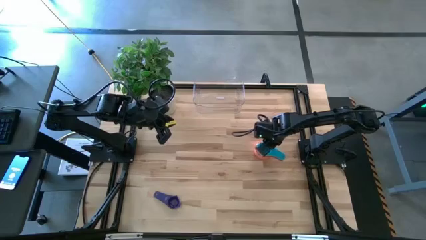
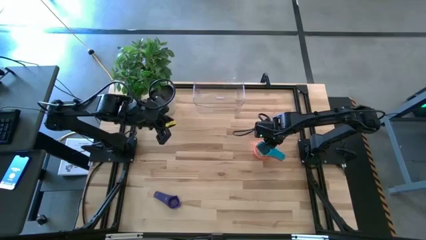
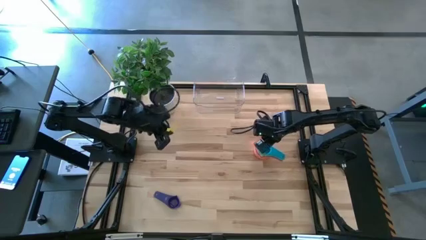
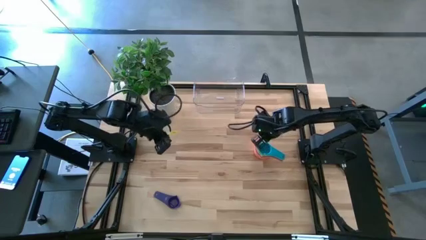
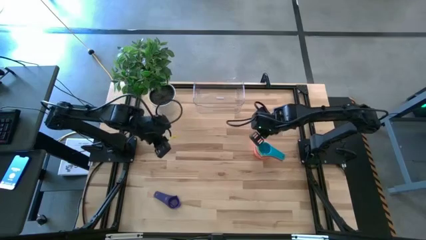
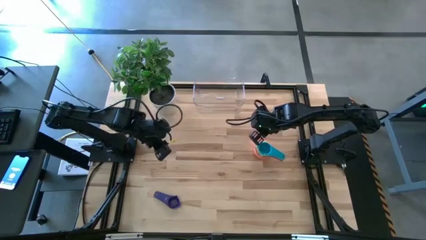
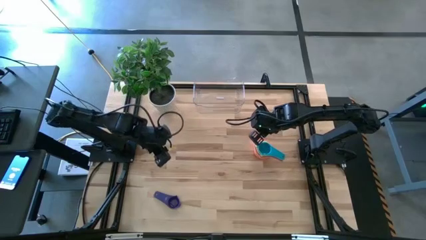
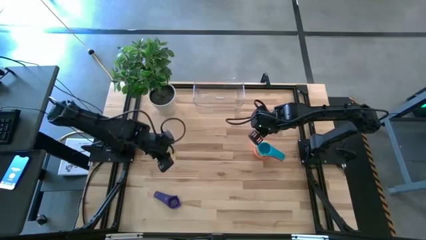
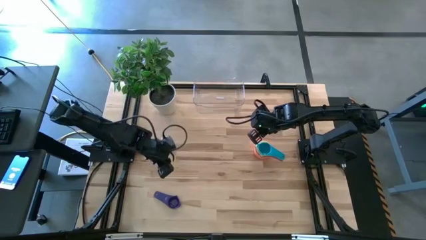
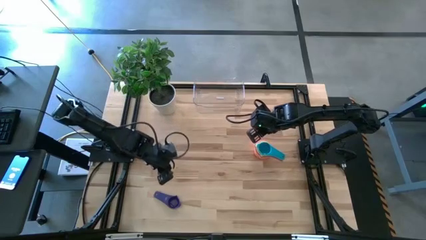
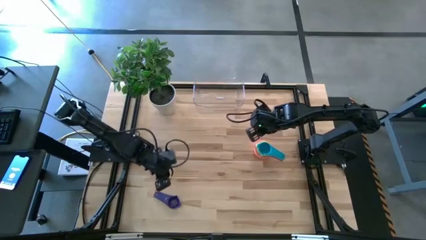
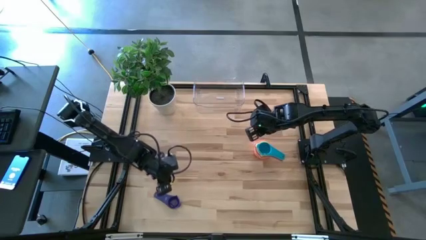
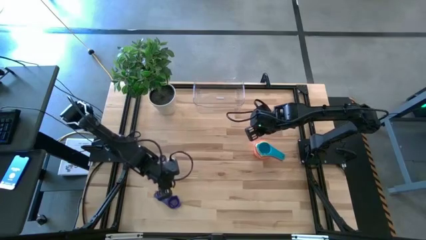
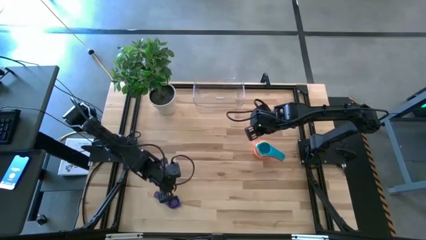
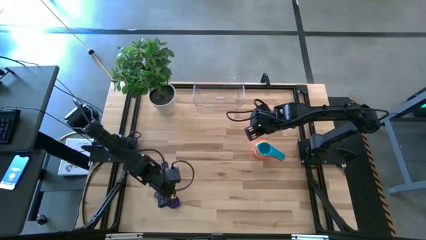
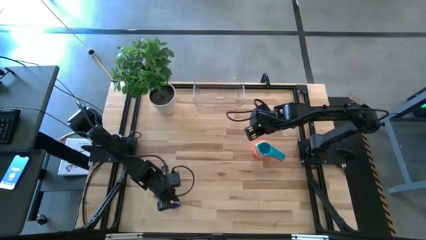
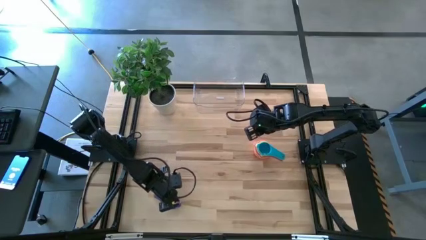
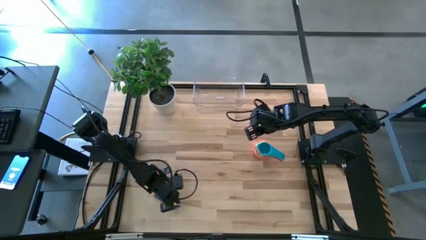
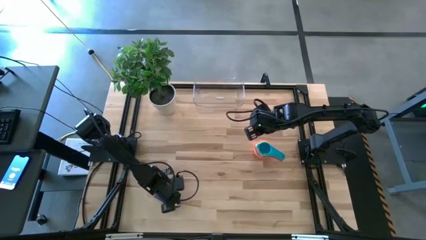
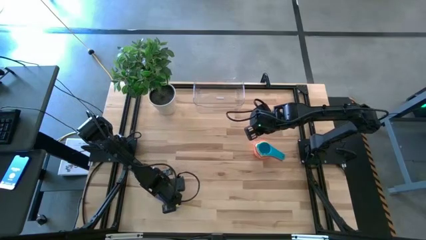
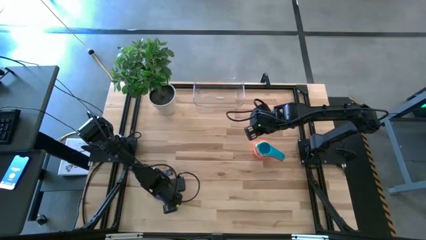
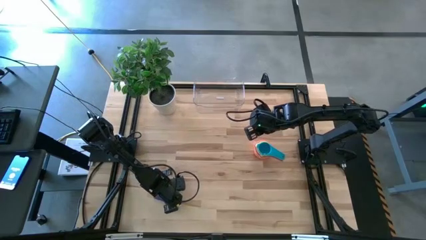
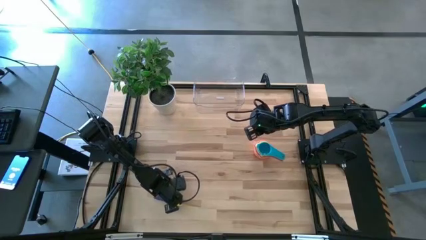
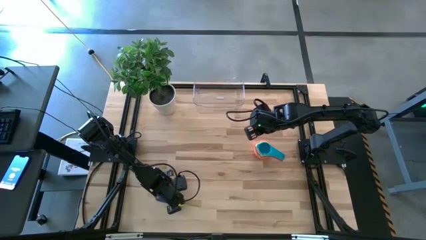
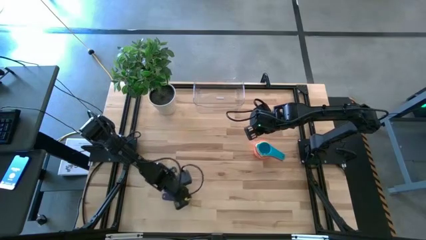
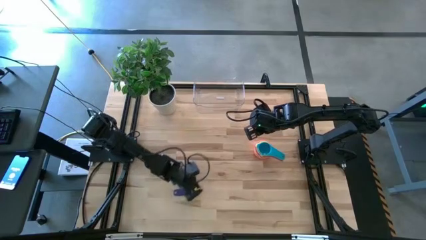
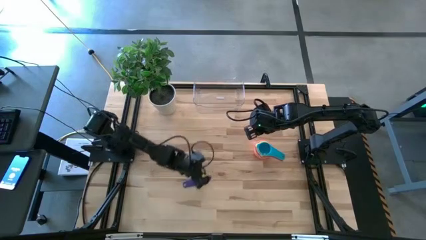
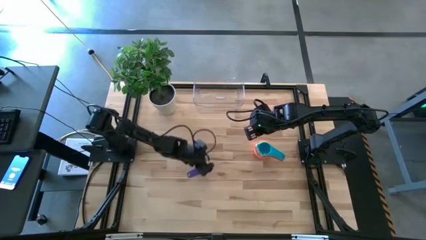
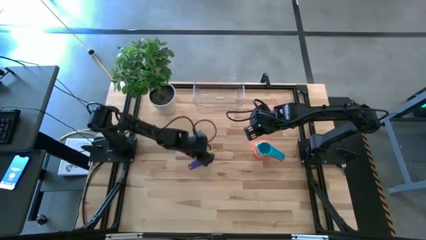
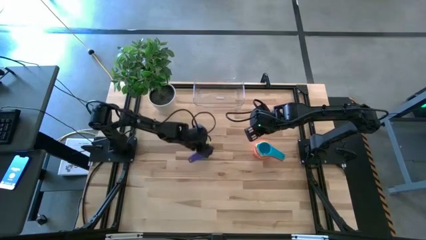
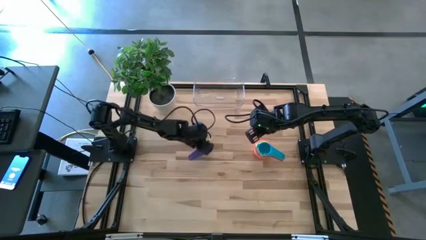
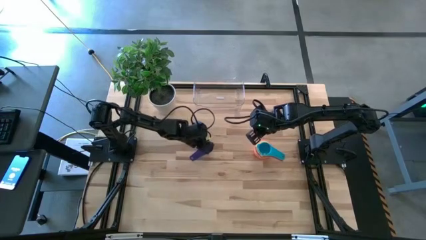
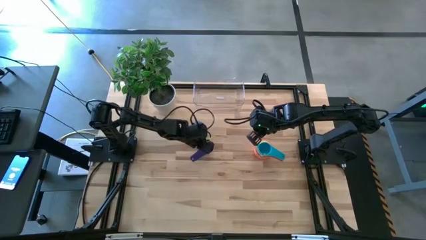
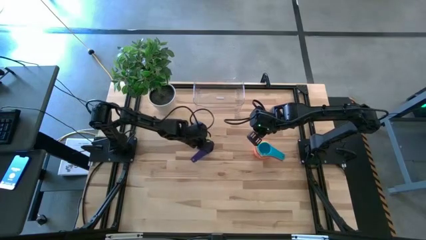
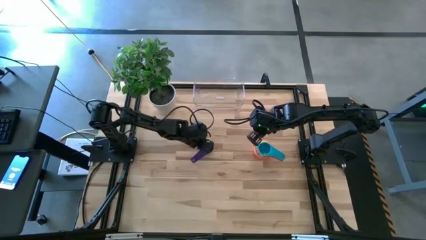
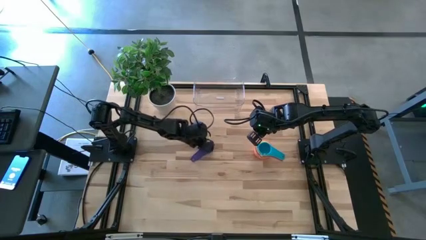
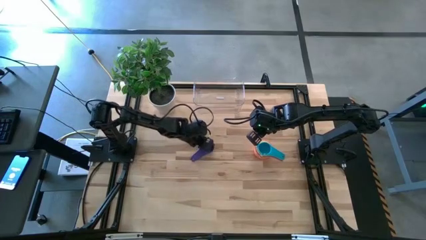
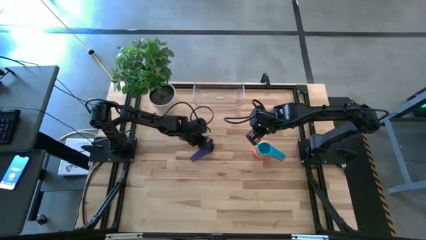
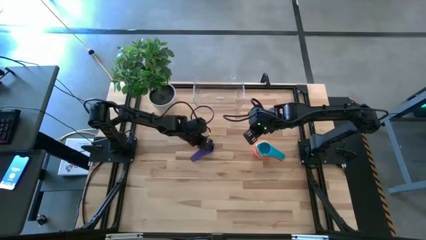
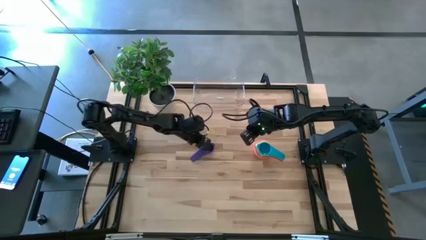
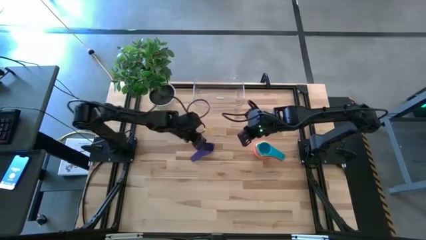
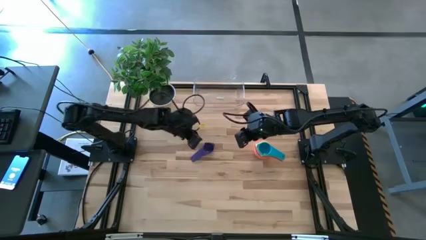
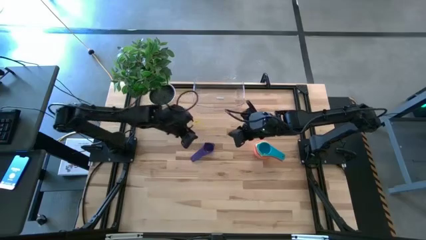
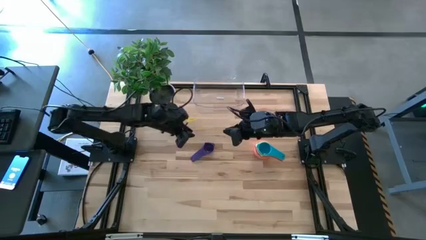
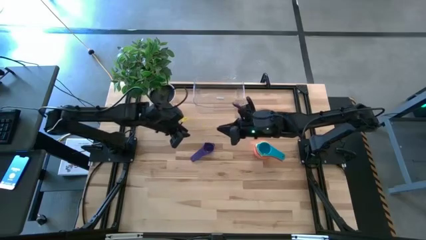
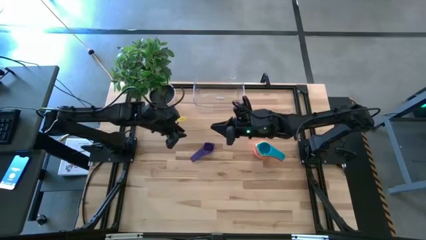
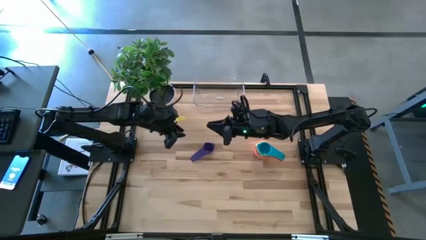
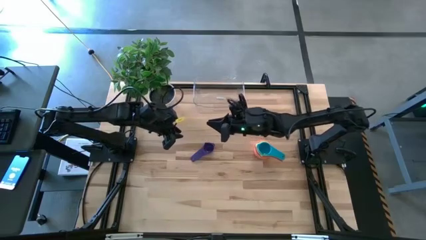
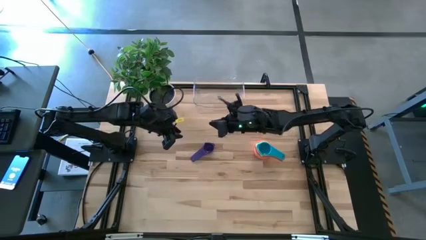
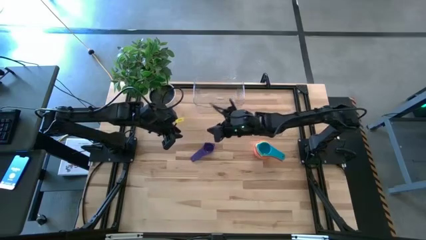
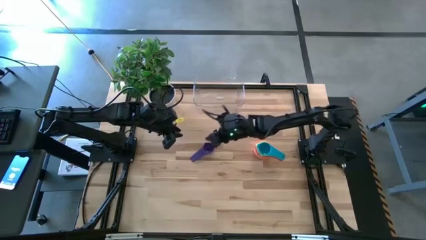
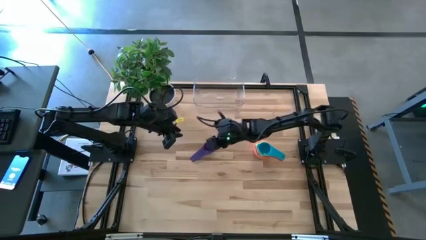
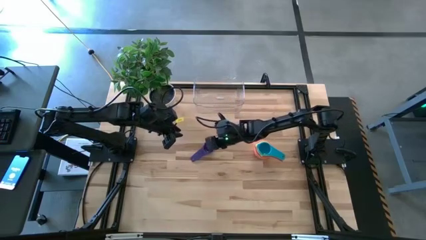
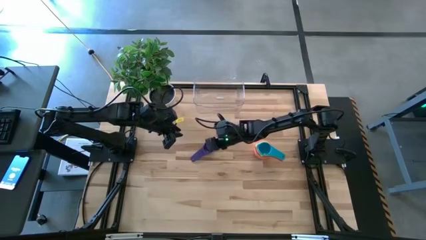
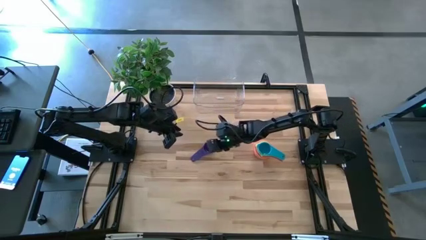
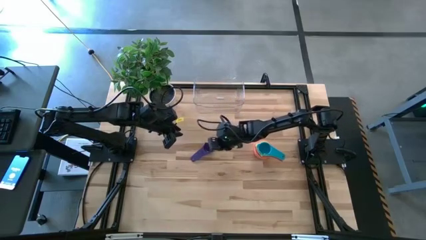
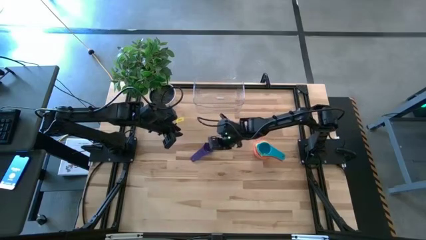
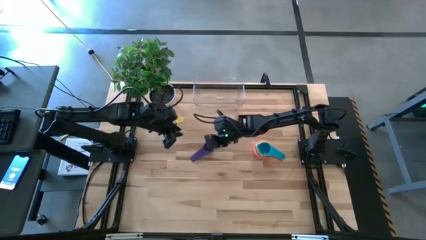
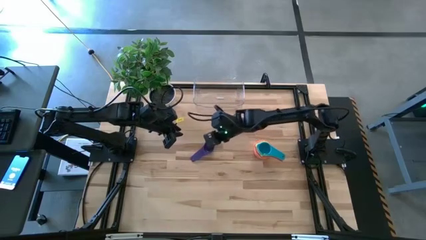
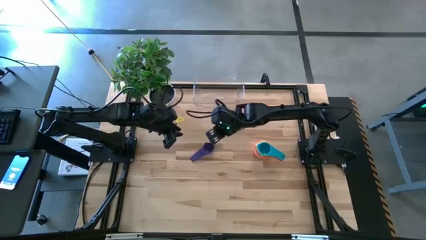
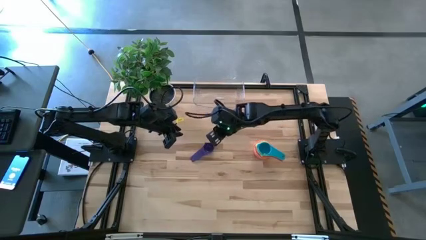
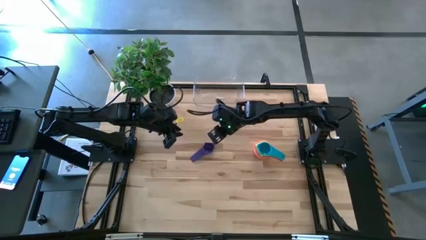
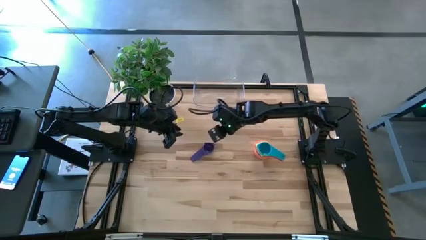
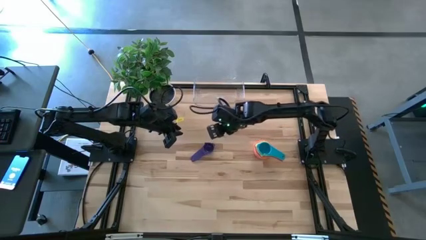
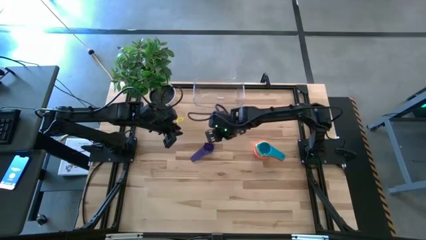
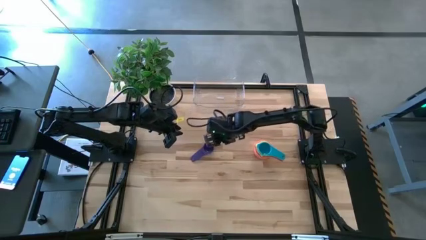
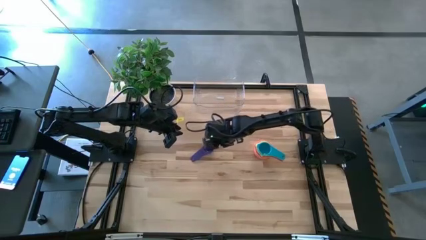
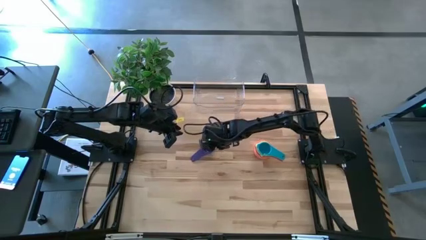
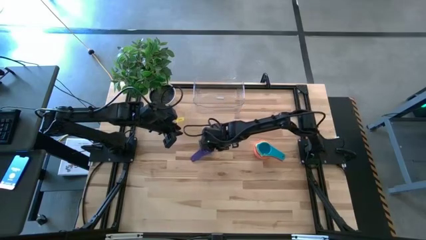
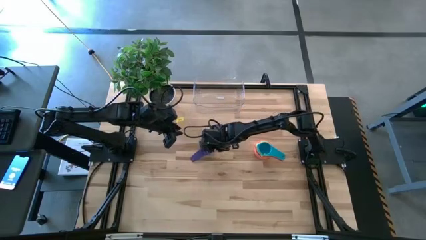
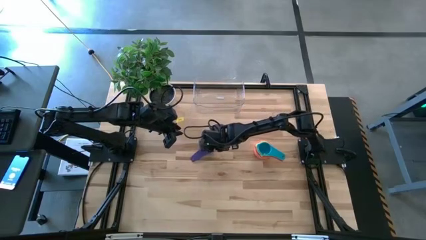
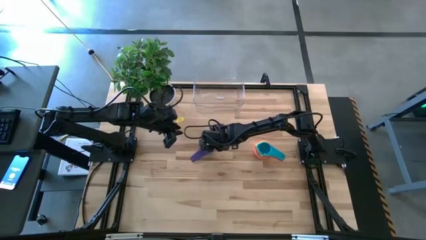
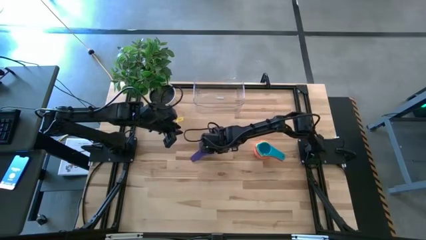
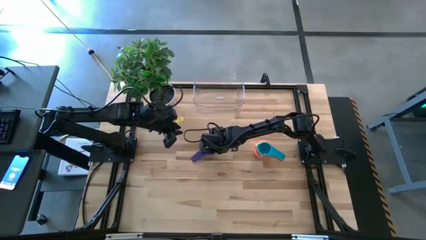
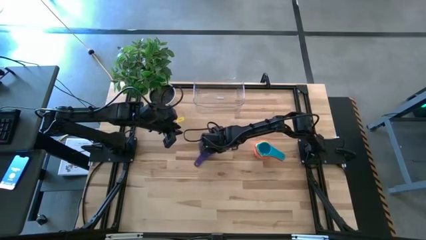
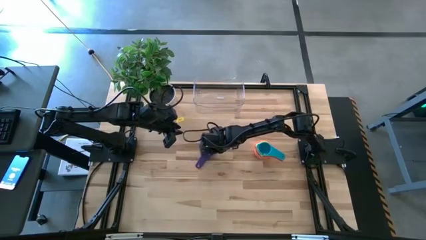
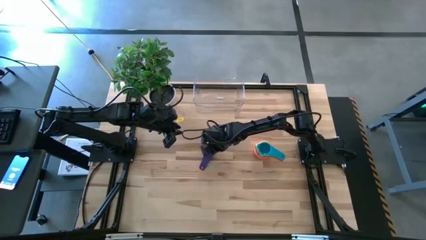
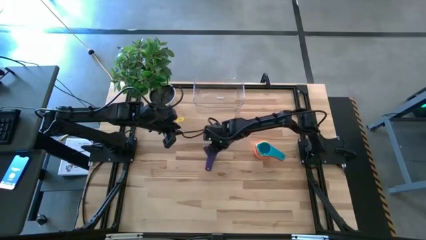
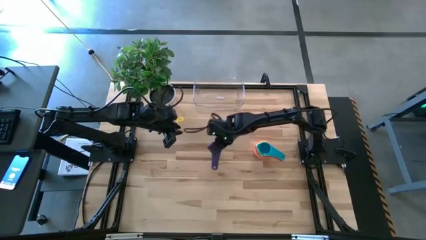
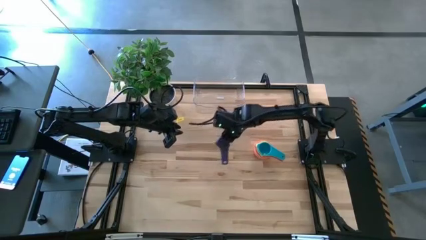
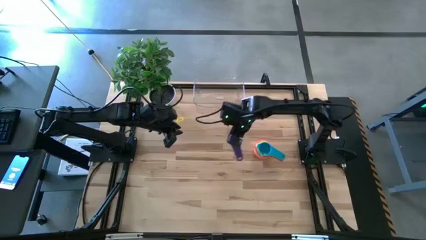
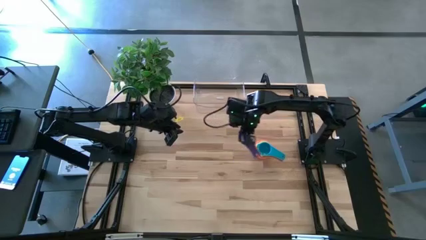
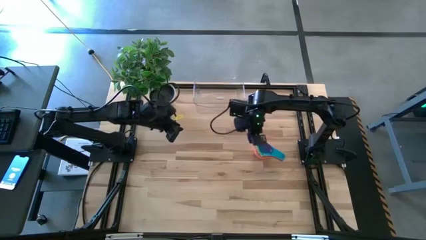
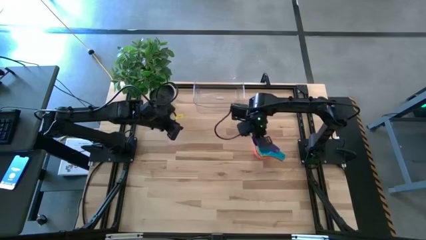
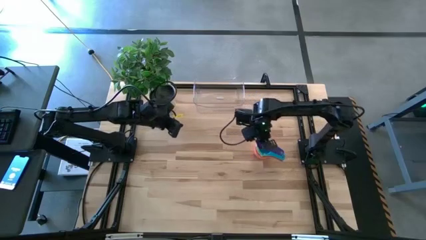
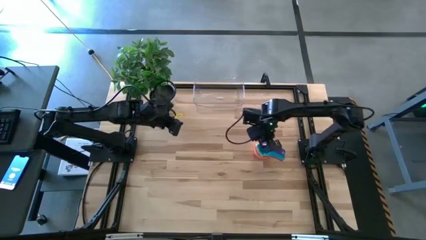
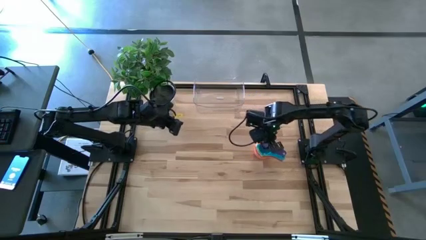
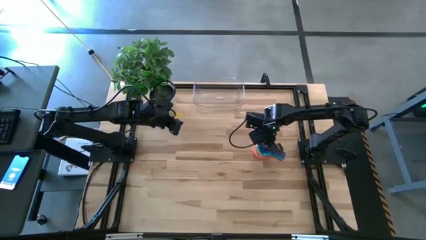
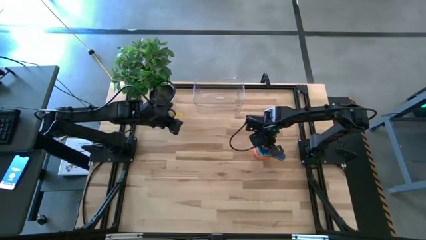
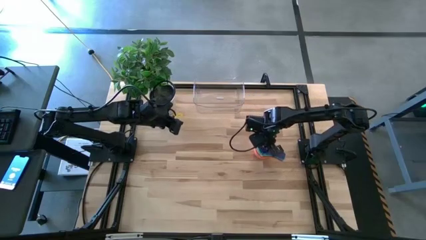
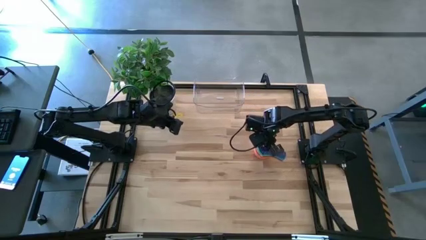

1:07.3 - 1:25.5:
Task: Nest measuring cups in basket
Stack the violet measuring cup on top of the light blue measuring cup
